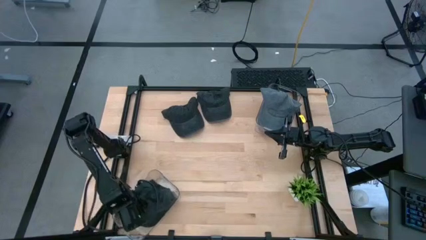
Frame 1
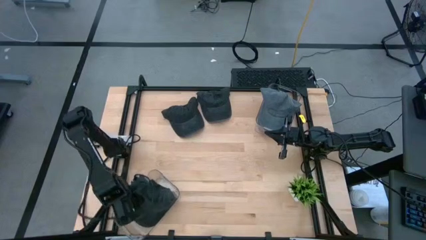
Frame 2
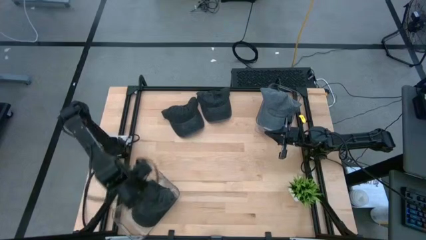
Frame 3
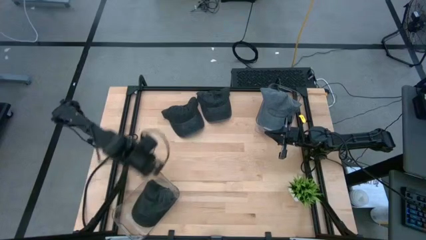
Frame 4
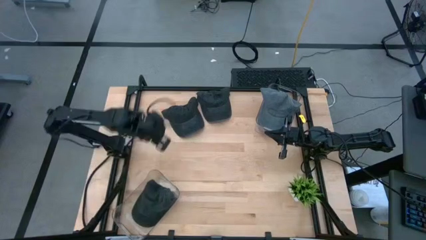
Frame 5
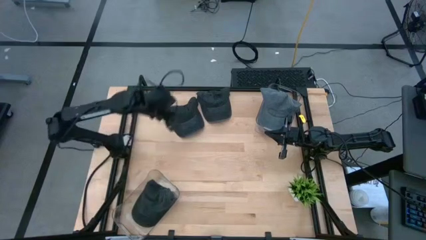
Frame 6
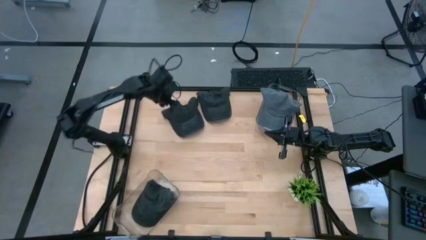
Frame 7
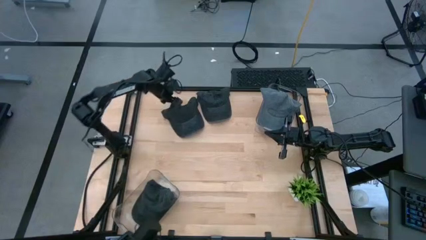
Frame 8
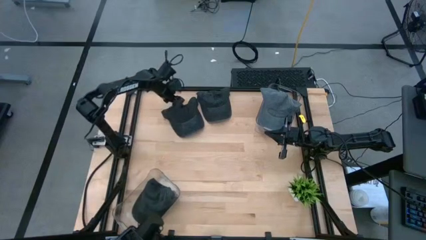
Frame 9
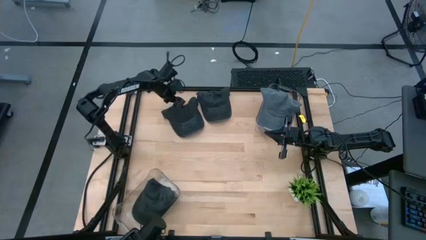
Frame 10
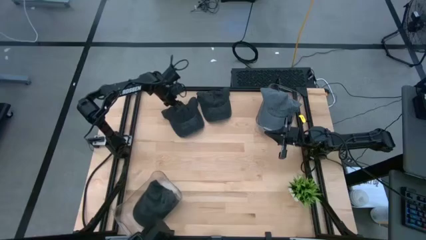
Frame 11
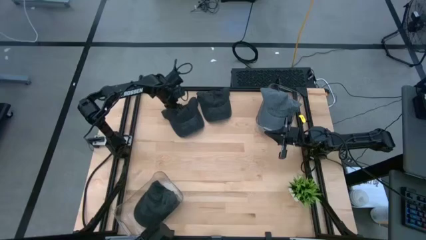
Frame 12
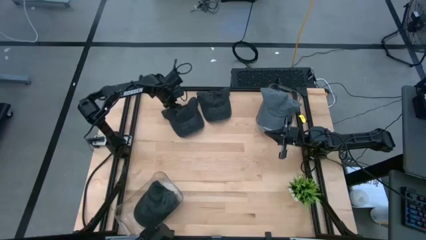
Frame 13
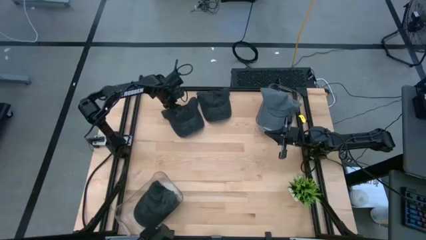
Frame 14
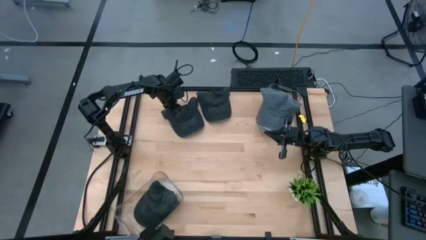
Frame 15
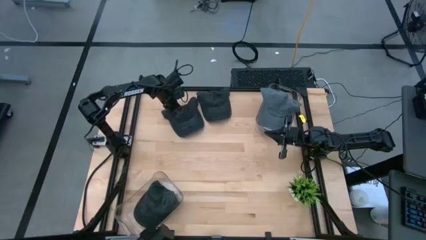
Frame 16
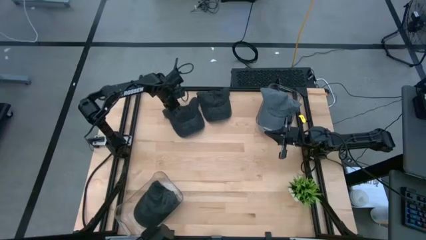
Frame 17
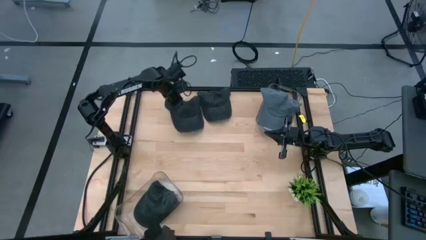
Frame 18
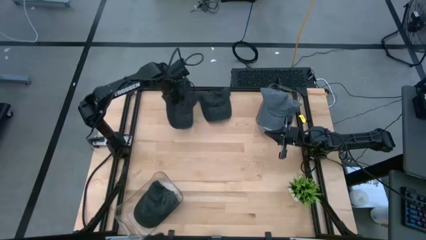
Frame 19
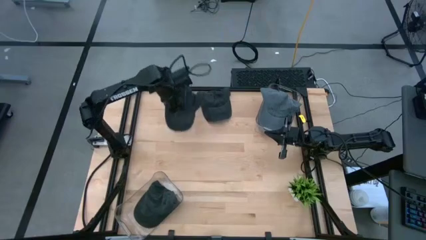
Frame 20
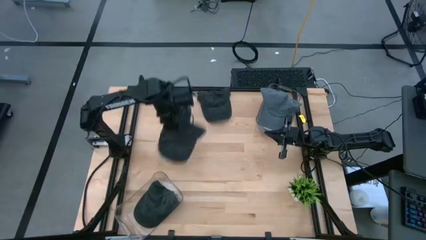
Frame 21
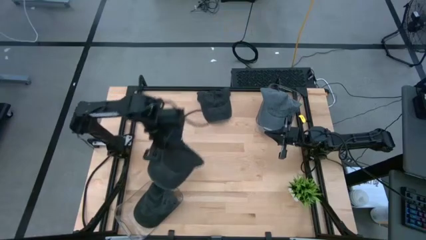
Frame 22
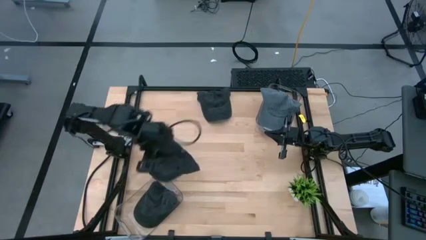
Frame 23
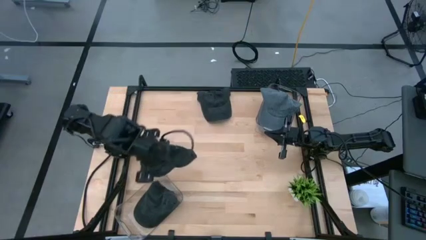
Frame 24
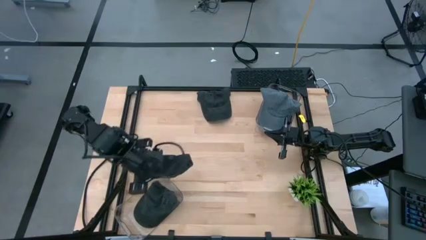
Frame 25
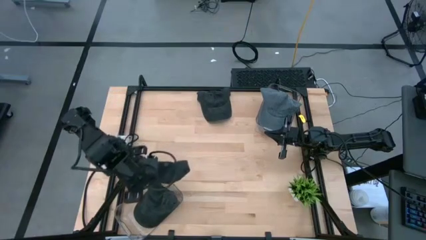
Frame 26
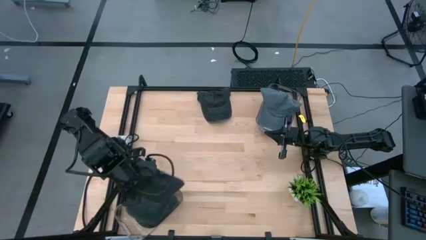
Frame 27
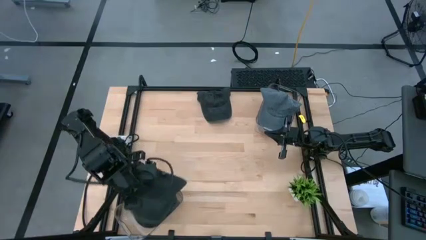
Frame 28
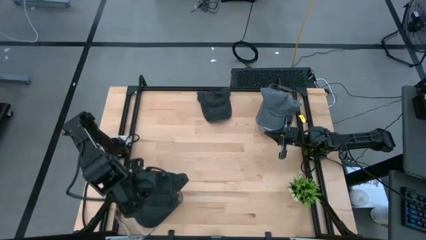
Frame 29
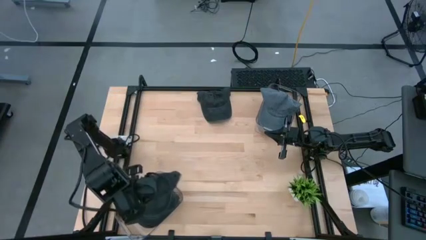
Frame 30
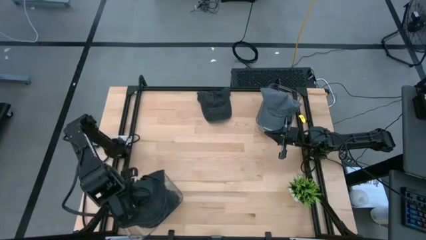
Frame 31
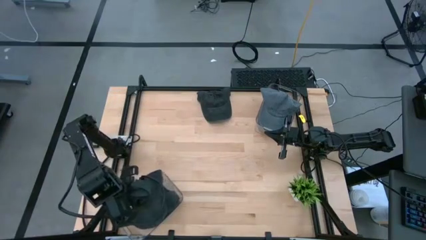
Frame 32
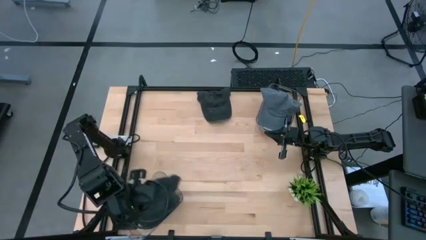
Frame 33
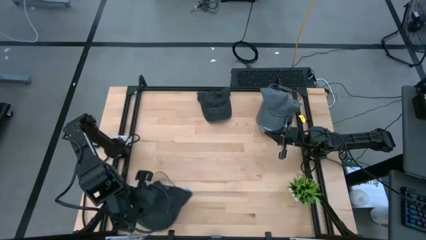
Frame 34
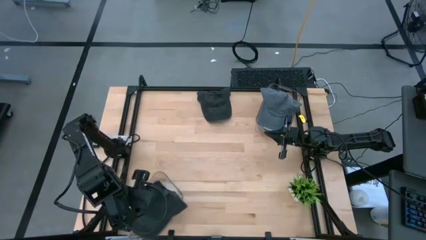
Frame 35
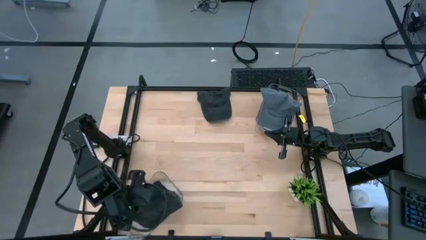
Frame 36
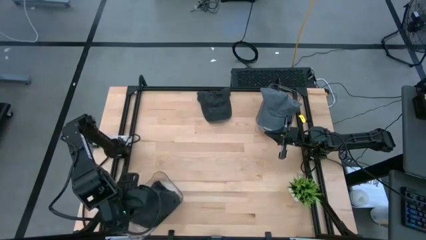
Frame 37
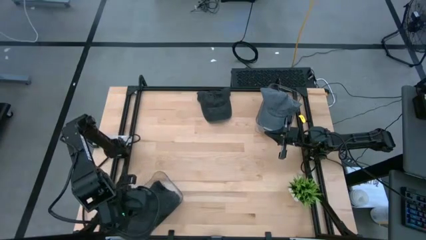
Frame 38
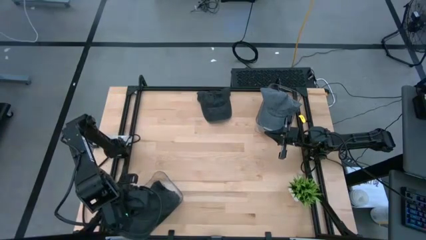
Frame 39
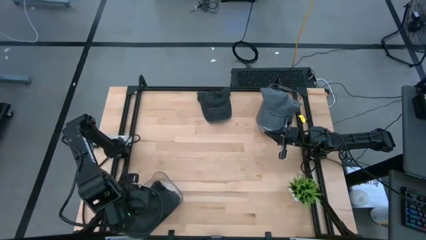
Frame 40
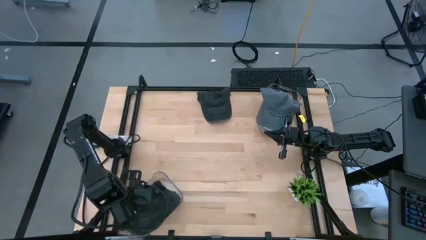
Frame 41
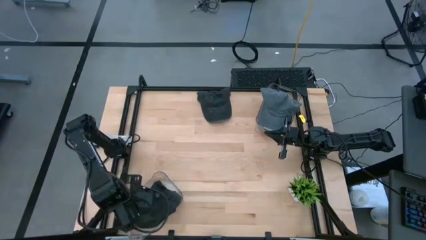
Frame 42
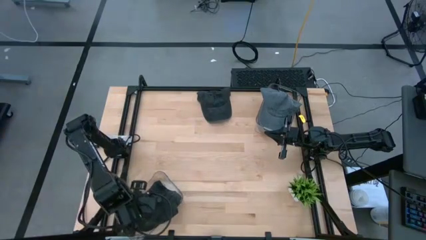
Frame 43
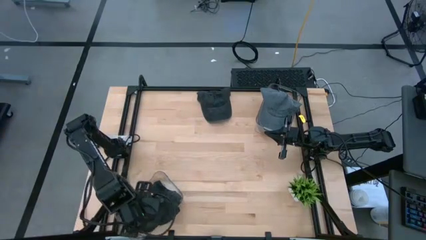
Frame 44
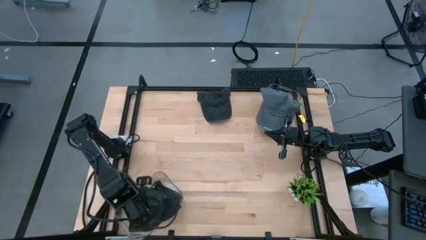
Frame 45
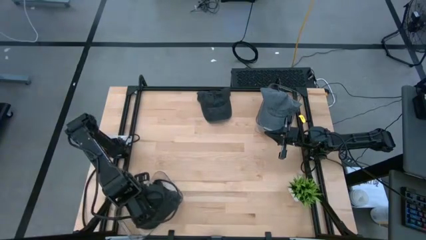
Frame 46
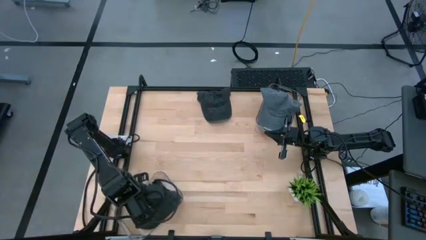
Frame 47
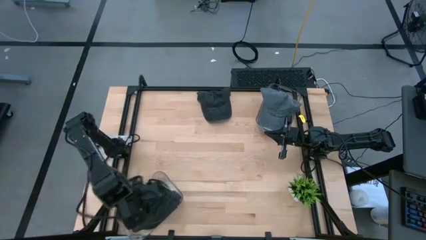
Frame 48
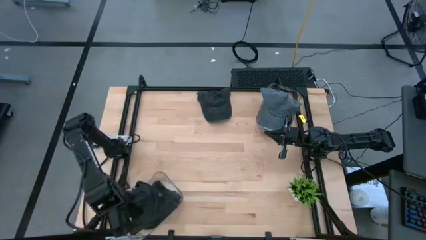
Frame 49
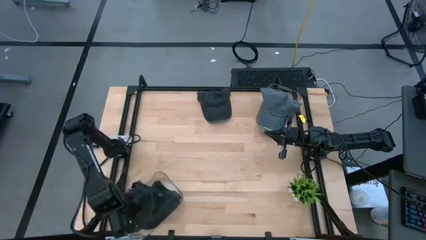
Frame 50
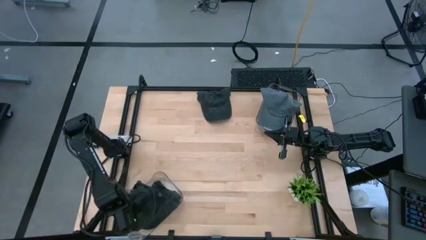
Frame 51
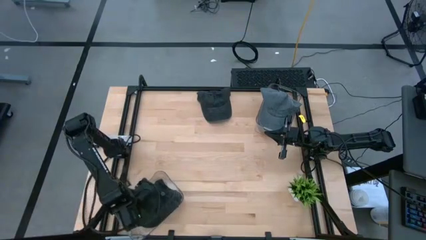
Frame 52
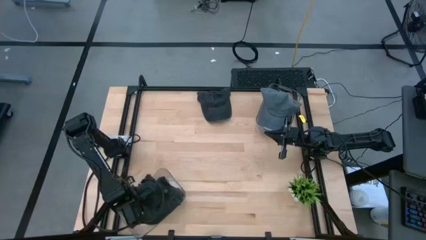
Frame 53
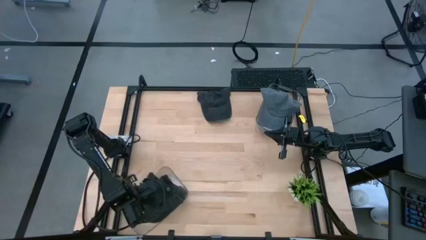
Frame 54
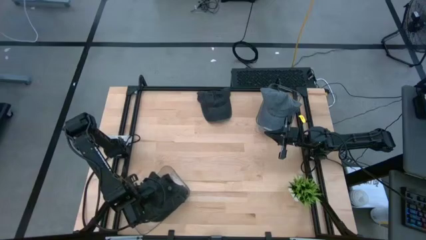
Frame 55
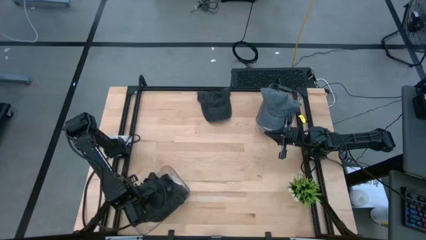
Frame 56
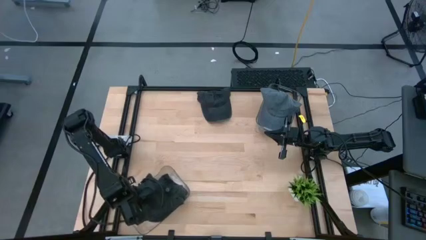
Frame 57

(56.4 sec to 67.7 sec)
Task: Pick & Place hat
Put the left black cap into the bottom transparent bin

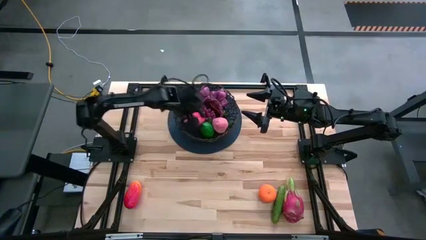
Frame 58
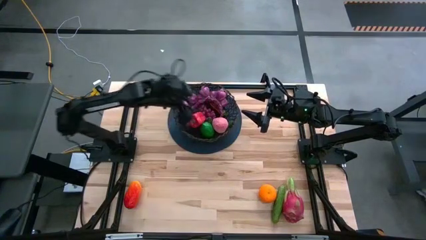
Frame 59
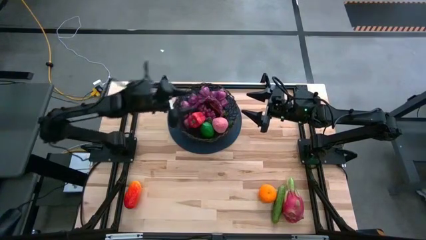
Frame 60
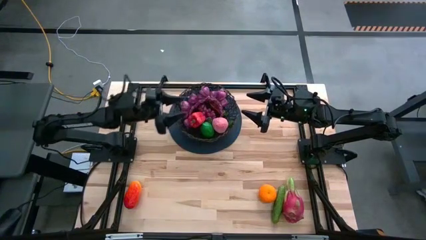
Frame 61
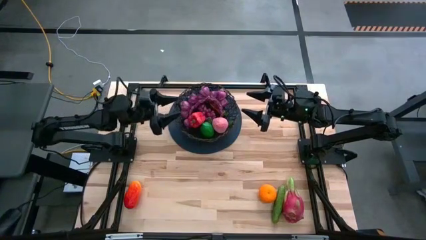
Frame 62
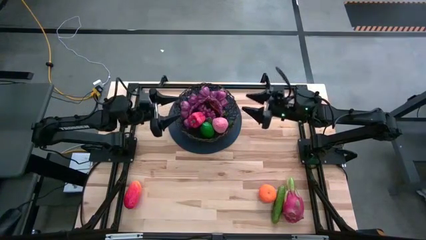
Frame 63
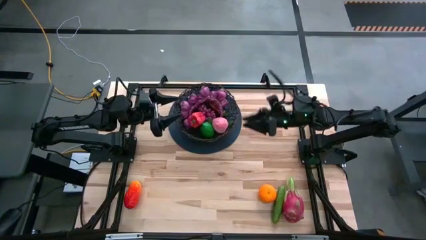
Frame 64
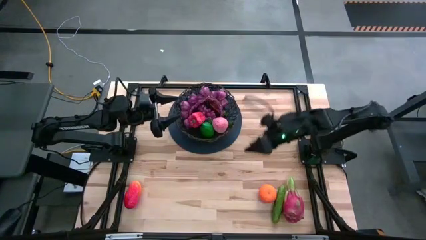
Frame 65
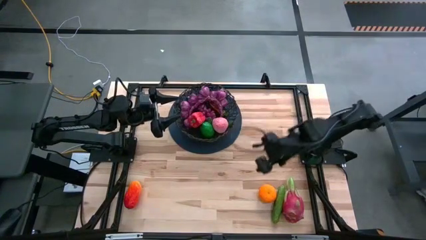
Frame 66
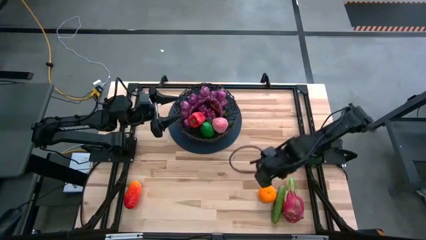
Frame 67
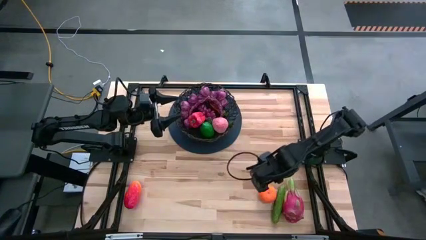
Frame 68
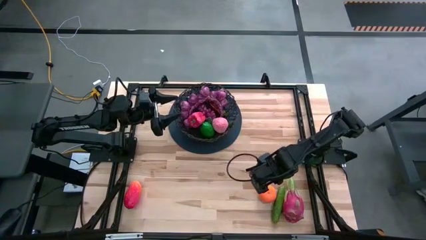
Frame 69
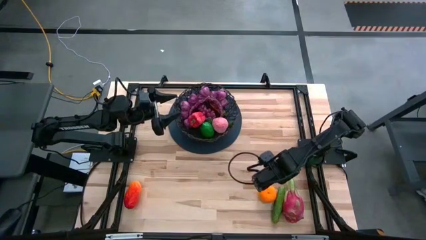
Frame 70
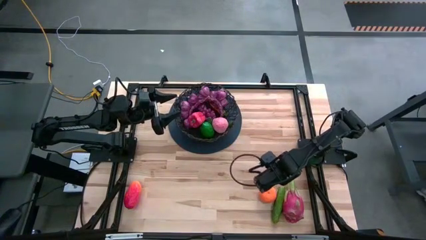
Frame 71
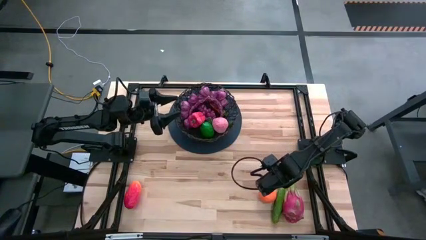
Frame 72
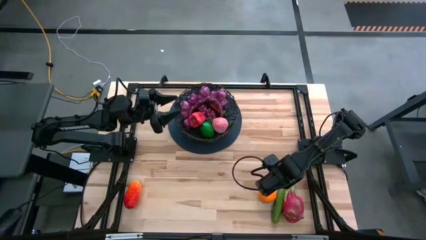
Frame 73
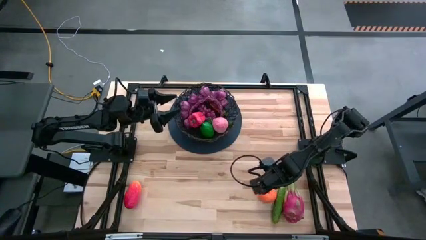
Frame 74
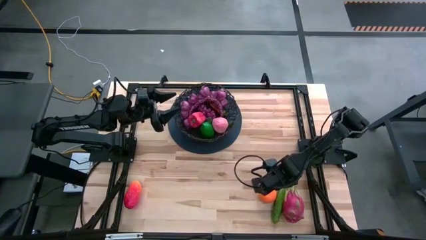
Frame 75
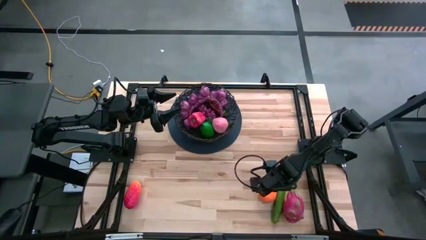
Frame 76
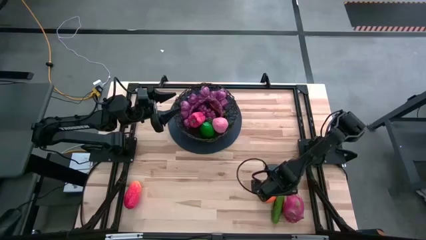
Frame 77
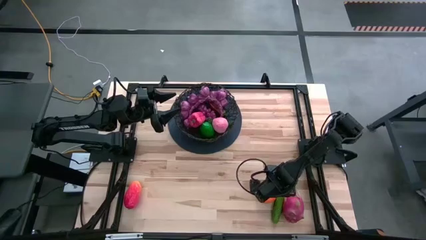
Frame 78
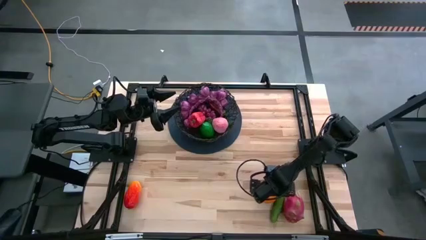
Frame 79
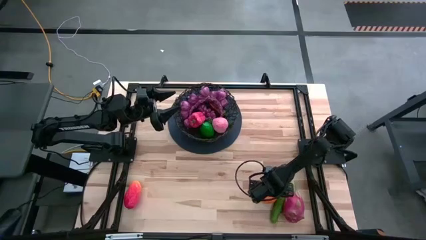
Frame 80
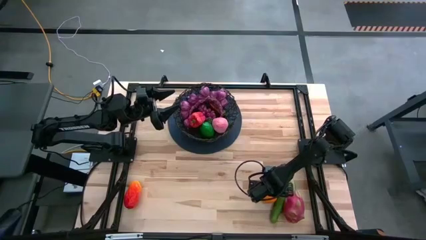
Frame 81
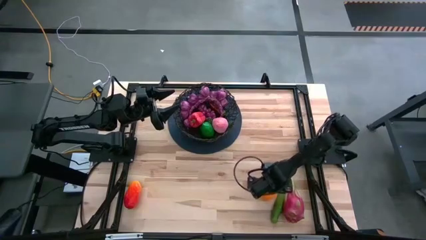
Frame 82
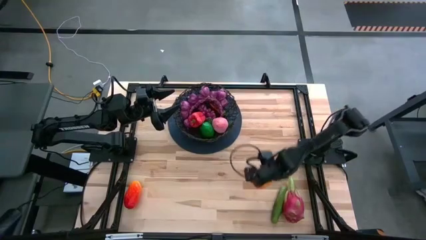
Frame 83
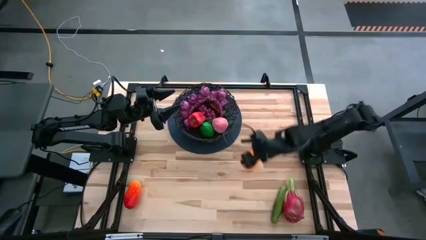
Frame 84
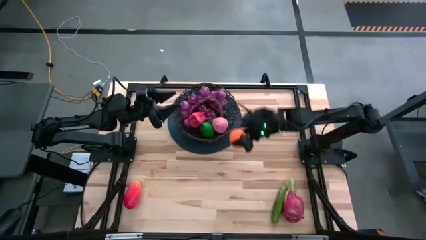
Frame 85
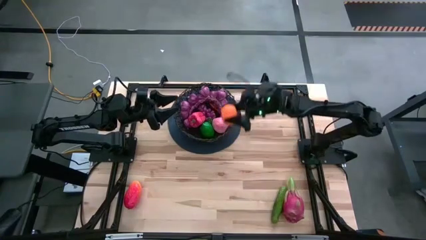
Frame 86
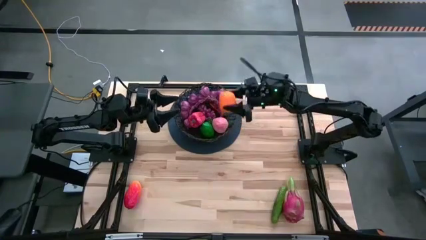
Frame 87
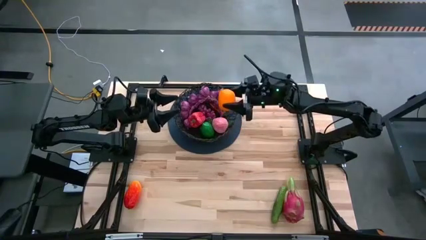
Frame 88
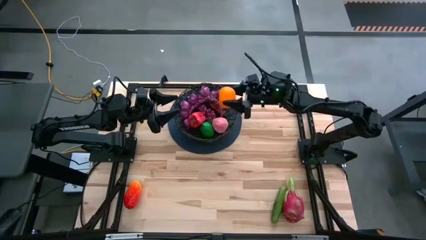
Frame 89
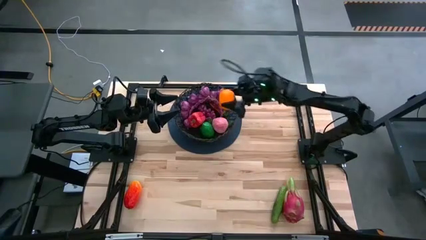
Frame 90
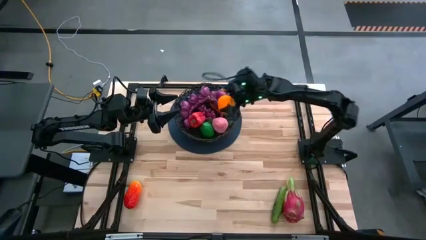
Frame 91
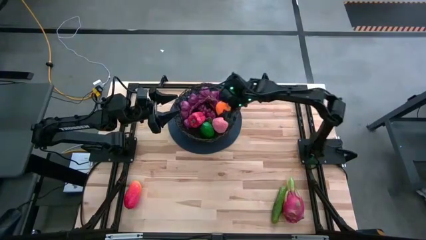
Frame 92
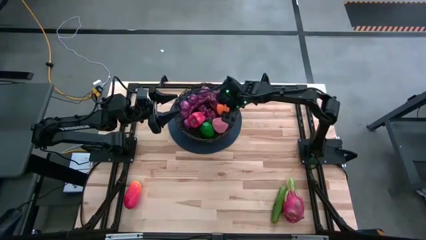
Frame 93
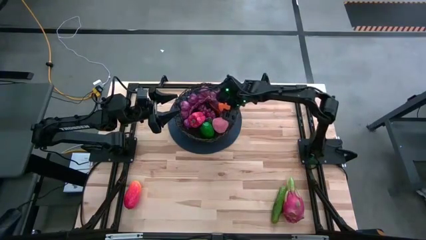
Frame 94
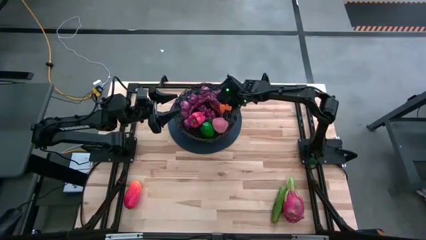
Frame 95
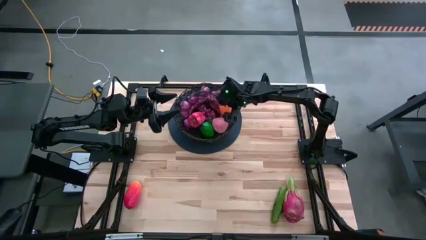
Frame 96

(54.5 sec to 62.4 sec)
Task: Build produce basket
Put the orange into the wire basket
